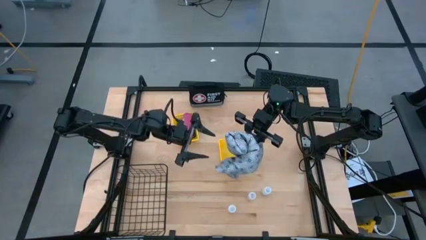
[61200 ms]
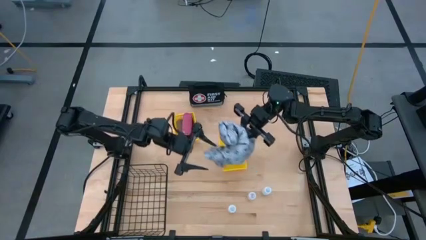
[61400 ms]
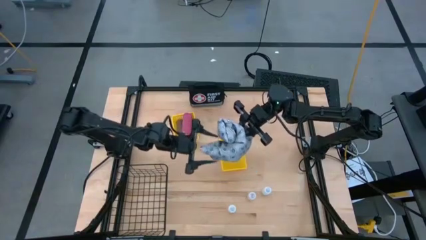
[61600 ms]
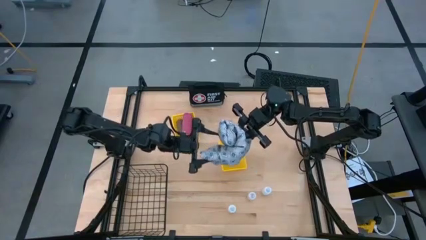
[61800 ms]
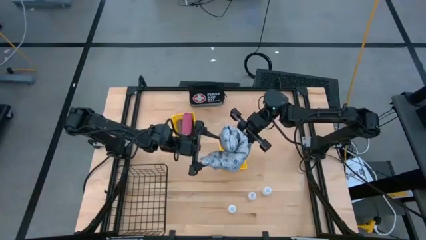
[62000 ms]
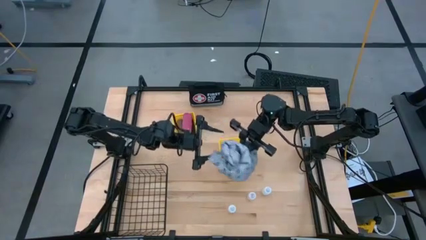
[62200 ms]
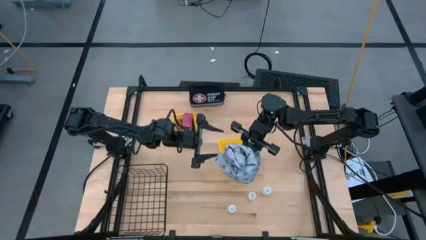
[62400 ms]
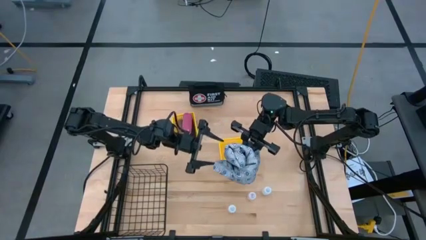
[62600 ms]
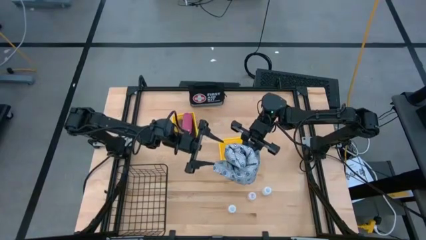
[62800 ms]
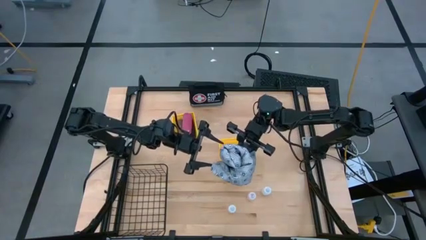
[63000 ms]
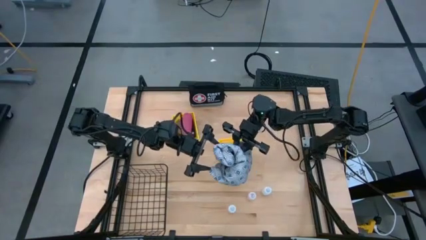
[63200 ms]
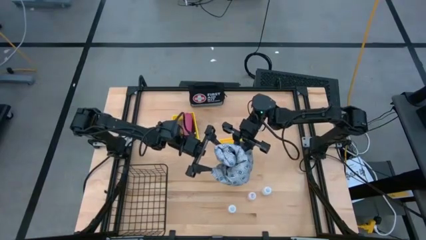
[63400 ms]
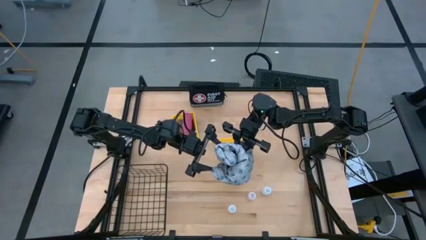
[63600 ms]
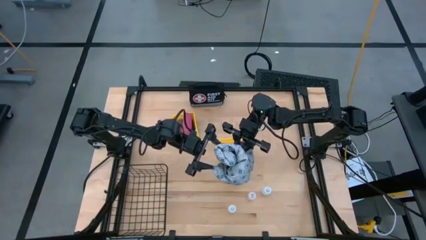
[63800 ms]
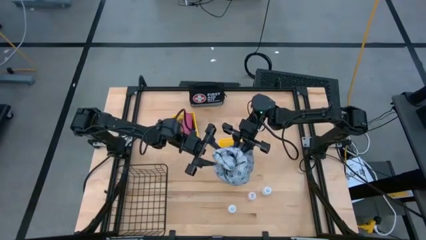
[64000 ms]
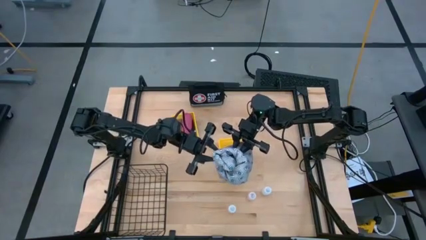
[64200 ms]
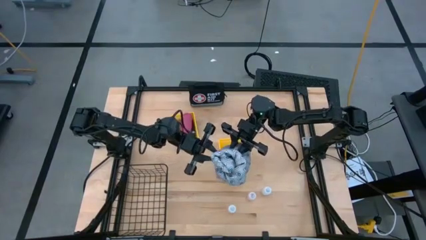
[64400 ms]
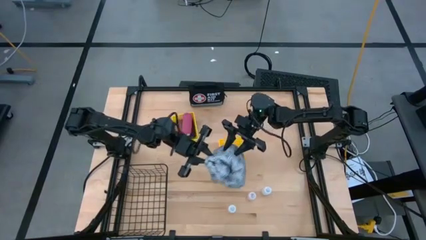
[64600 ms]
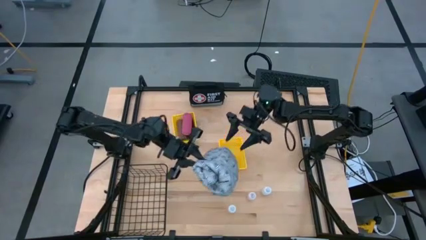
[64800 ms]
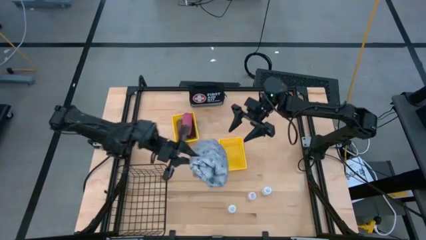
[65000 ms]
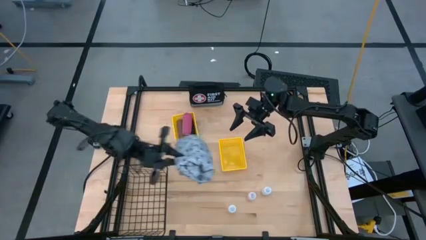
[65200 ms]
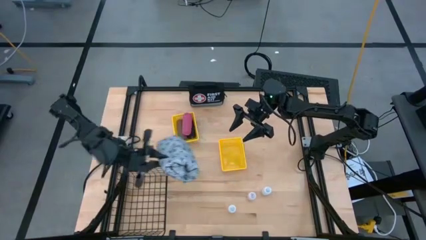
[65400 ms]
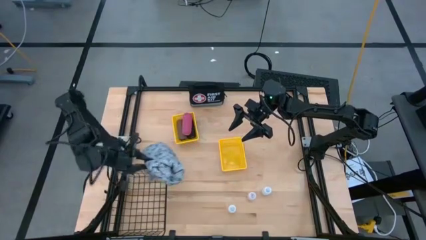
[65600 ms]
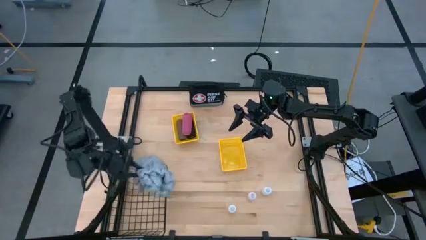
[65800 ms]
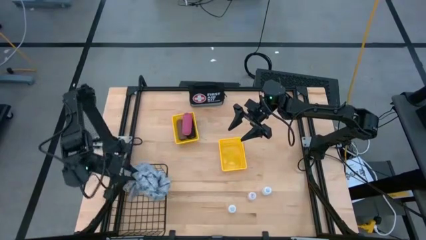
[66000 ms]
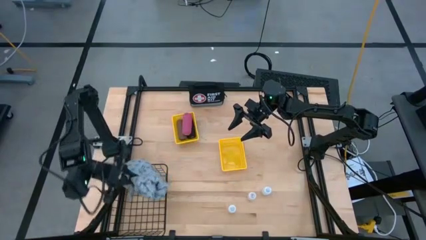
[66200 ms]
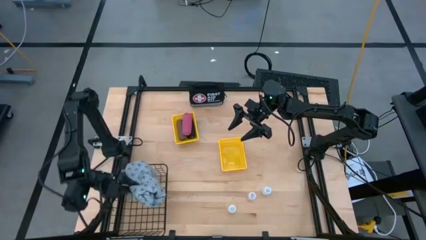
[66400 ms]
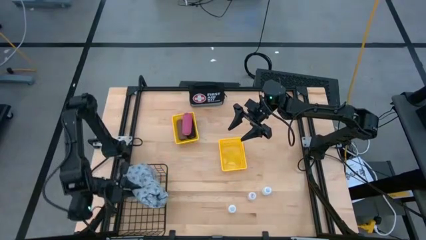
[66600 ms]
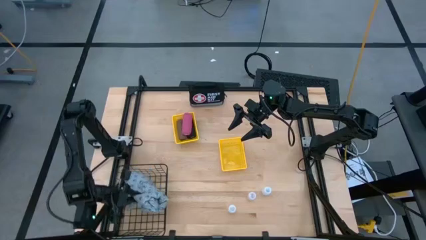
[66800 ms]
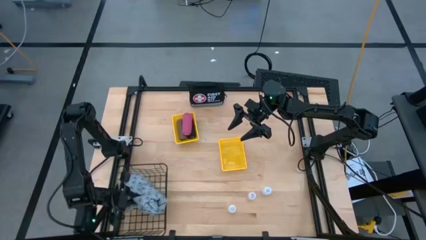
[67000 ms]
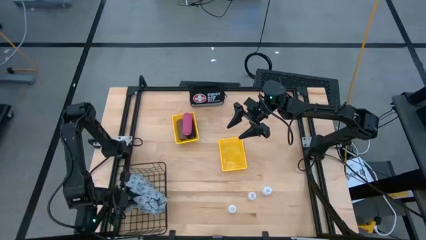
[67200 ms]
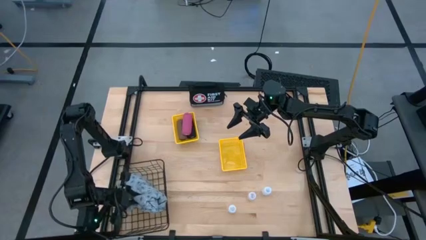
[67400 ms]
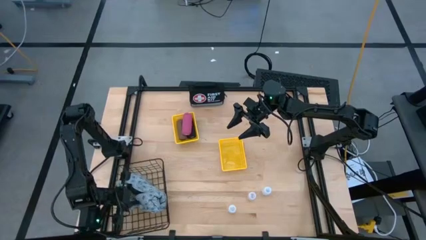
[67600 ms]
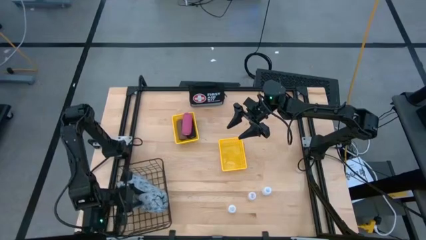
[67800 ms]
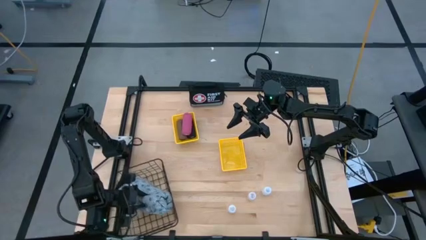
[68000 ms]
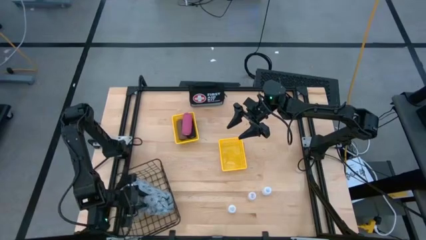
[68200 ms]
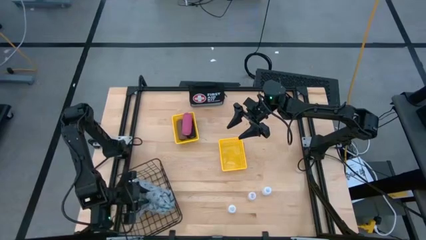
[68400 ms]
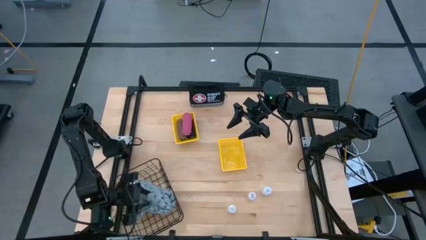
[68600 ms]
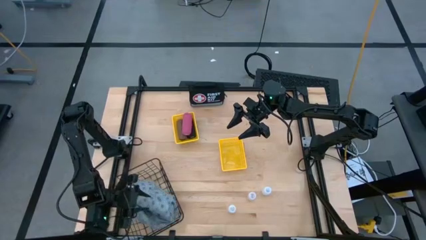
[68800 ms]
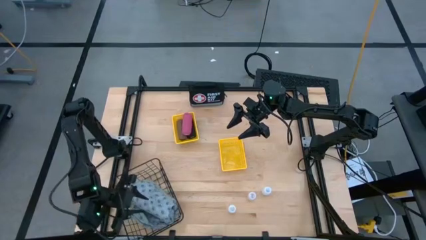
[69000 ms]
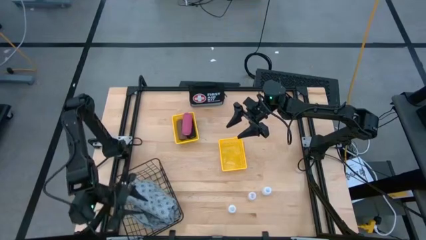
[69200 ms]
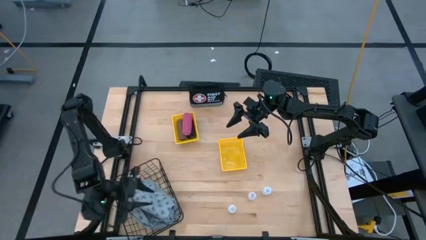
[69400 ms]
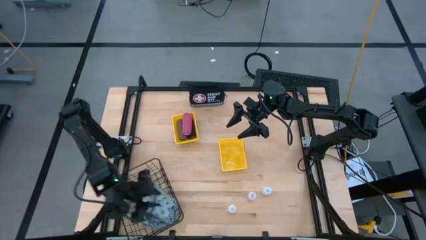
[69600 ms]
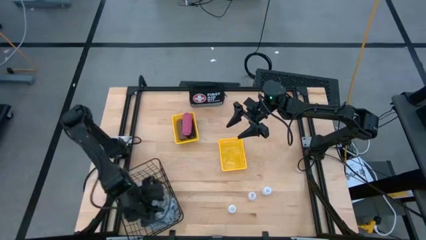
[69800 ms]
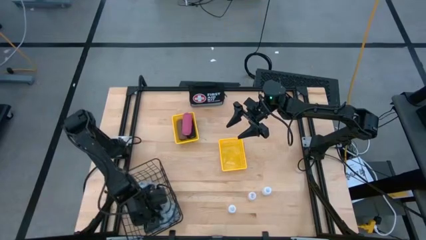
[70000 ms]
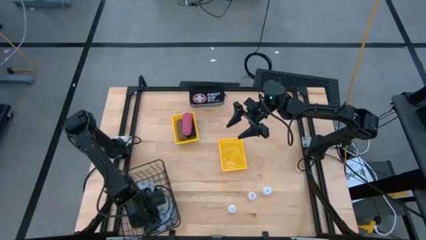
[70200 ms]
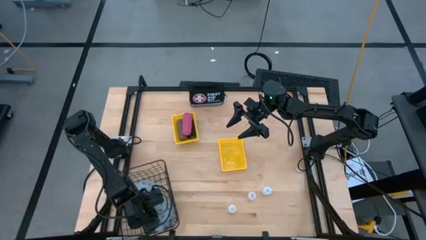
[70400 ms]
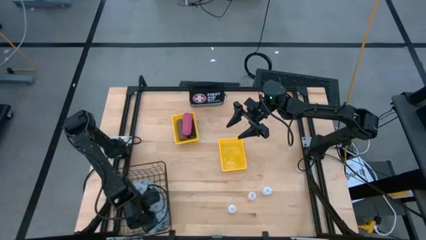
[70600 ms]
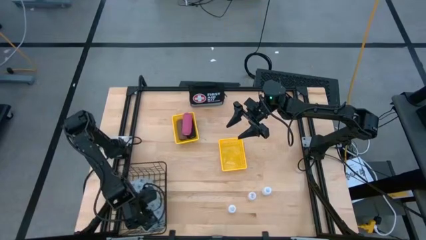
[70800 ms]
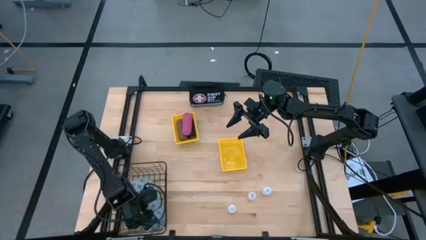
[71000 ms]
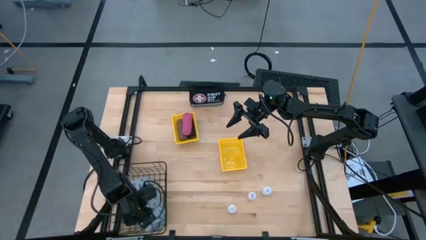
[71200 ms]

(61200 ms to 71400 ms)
Task: Pick & Place Medicine items
Put the blue patient gown into the wire basket

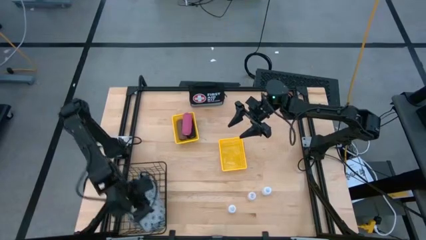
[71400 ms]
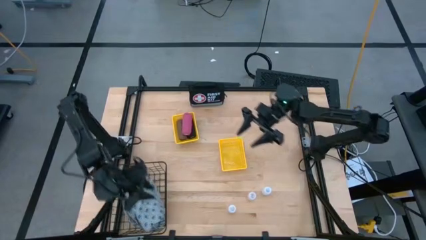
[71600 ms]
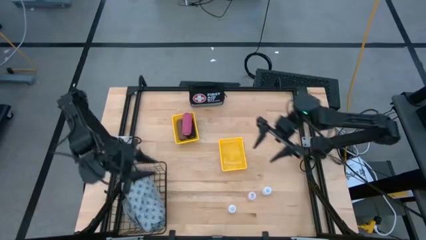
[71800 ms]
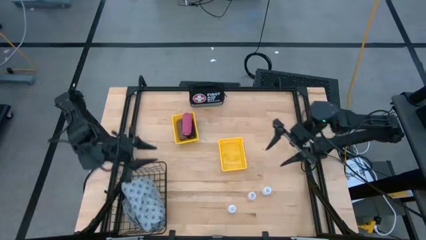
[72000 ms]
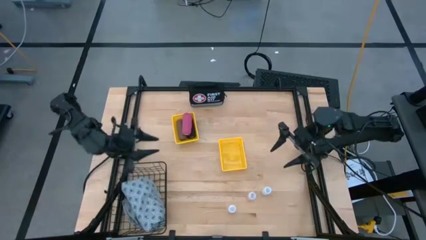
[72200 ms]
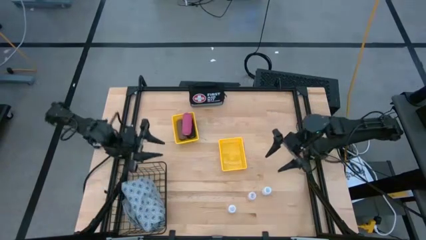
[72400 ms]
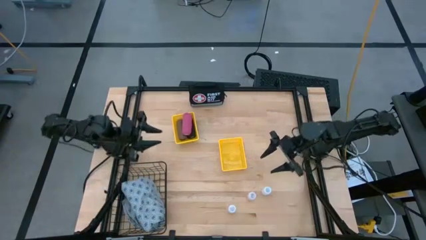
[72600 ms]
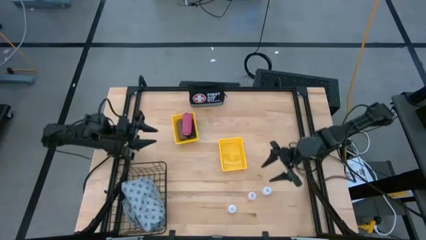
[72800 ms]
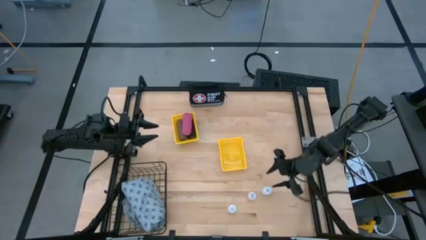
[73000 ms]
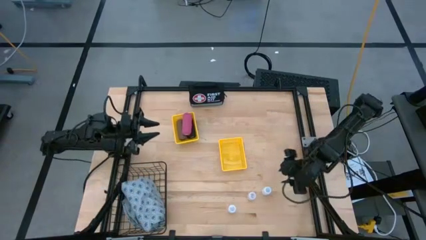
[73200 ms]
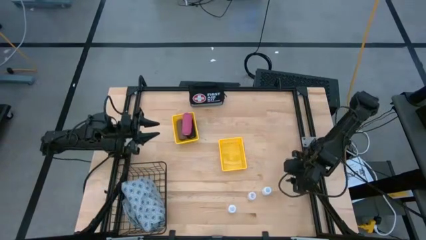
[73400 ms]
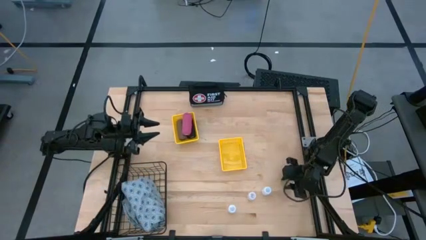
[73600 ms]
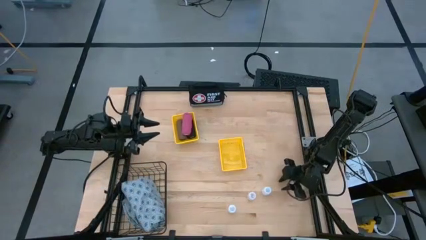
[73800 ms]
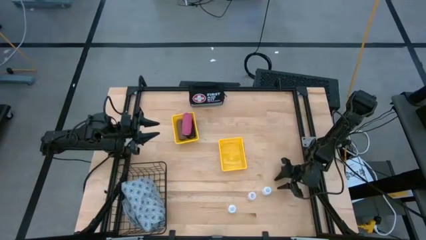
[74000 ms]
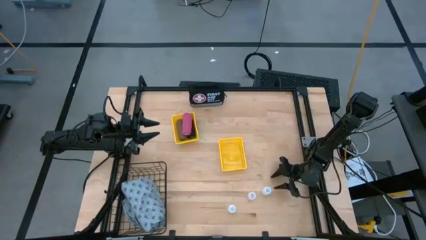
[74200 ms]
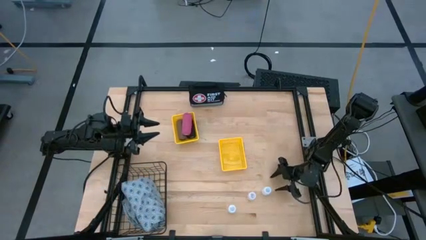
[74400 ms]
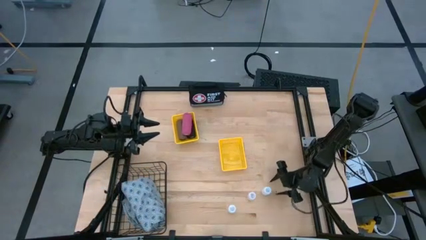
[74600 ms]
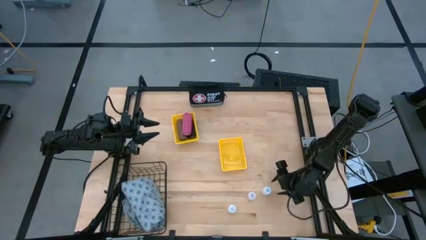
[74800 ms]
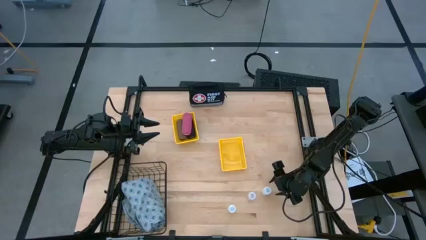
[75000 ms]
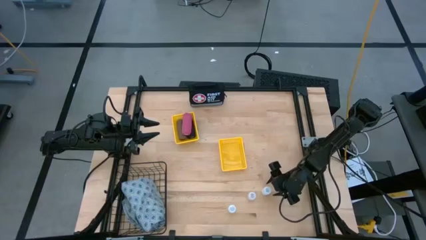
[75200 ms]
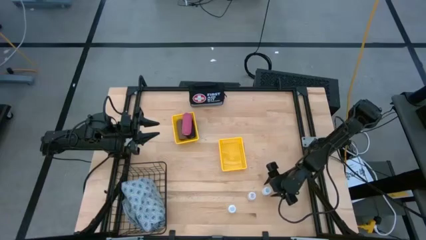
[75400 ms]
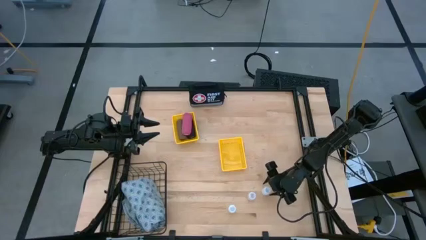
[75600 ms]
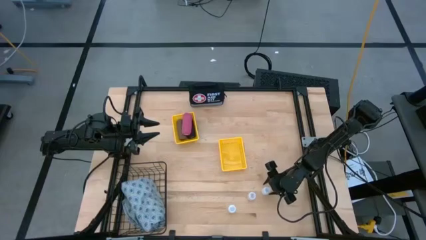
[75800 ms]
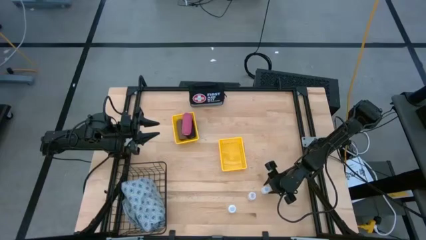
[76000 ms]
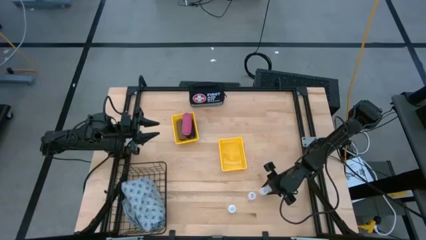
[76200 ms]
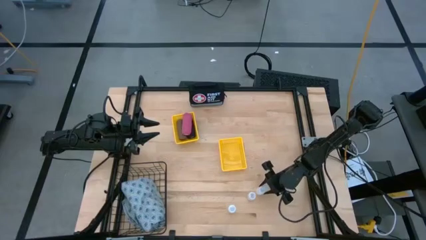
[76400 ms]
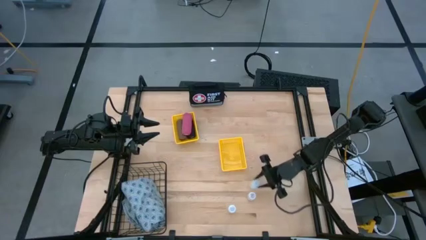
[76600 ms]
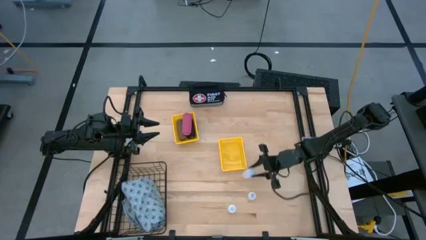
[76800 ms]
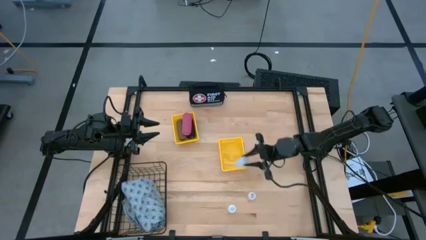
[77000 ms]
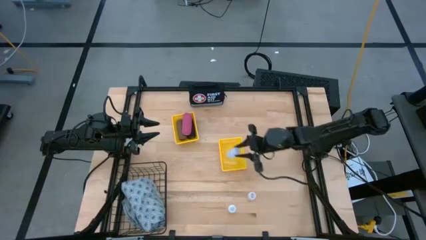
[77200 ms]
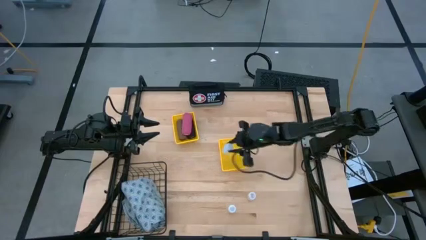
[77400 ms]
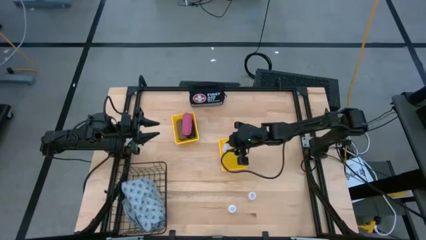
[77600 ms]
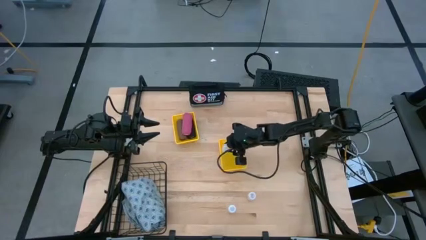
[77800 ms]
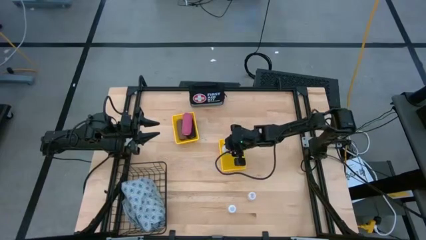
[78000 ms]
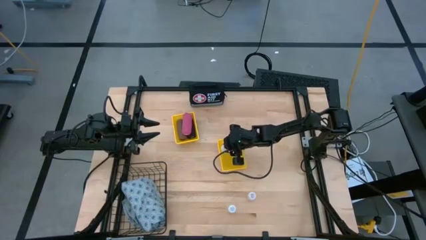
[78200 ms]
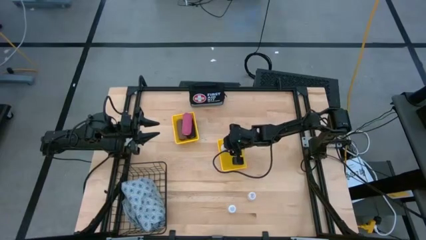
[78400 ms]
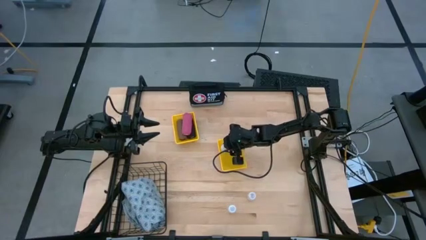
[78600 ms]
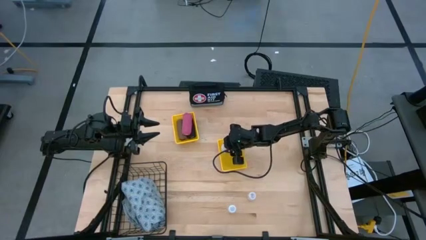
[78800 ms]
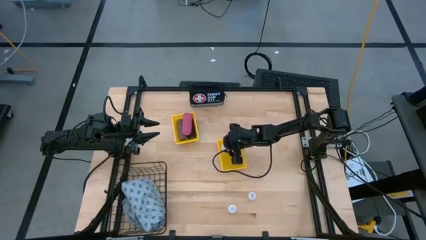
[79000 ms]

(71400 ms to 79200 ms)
Put the top right transparent medicine bottle into the right yellow basket
